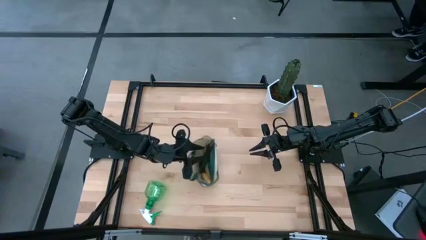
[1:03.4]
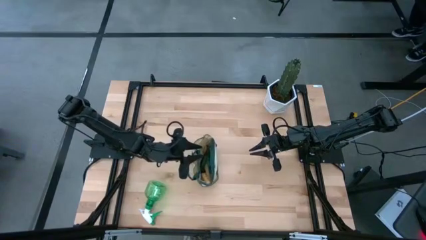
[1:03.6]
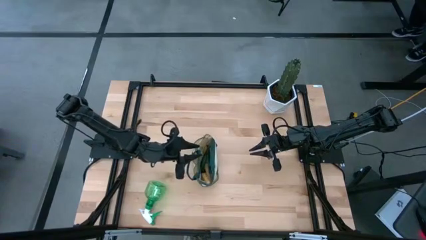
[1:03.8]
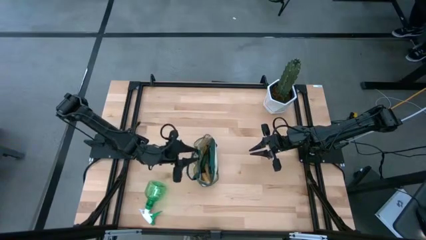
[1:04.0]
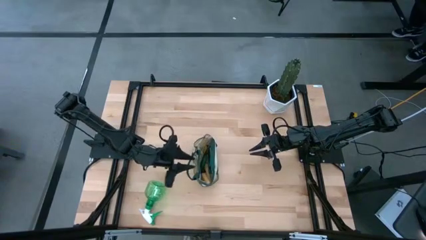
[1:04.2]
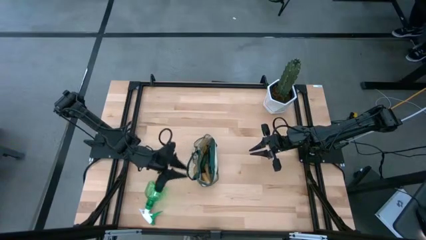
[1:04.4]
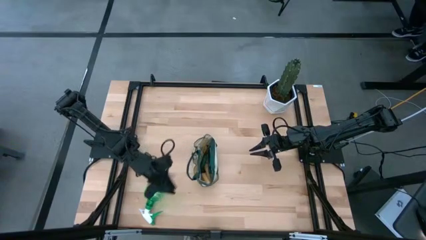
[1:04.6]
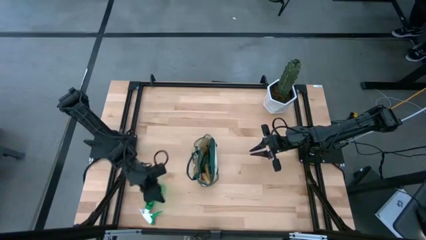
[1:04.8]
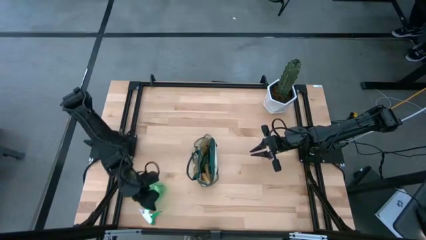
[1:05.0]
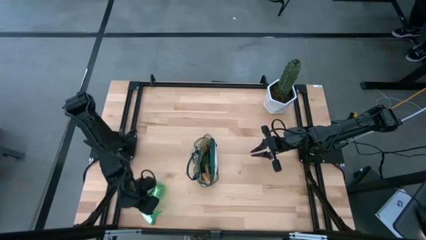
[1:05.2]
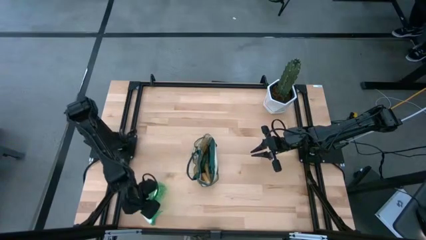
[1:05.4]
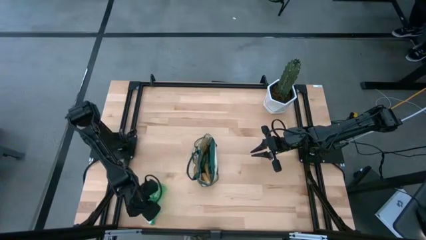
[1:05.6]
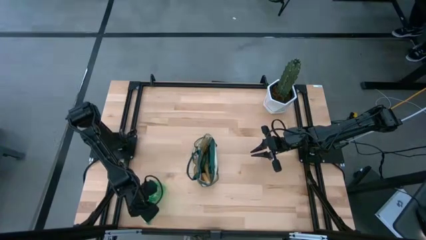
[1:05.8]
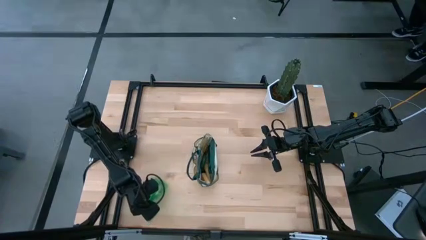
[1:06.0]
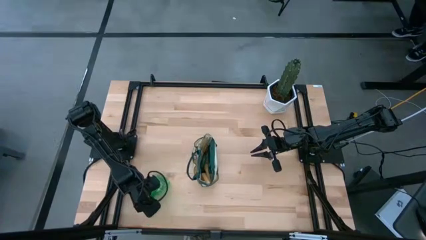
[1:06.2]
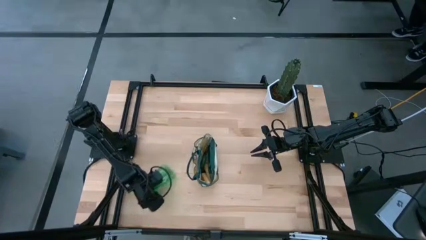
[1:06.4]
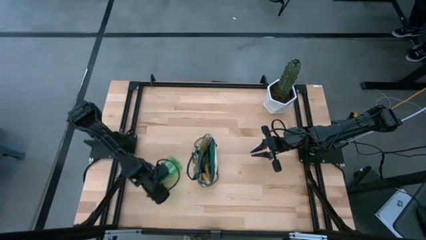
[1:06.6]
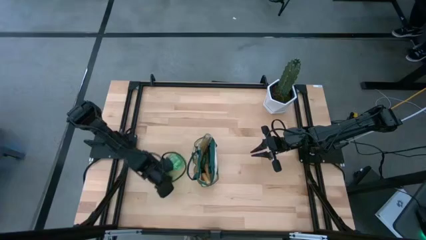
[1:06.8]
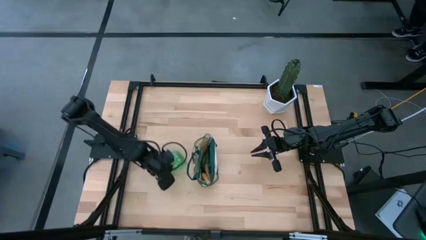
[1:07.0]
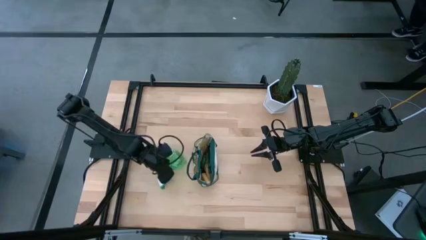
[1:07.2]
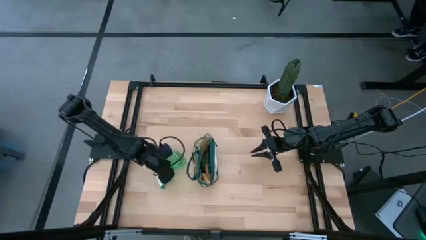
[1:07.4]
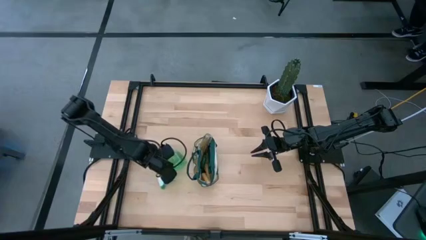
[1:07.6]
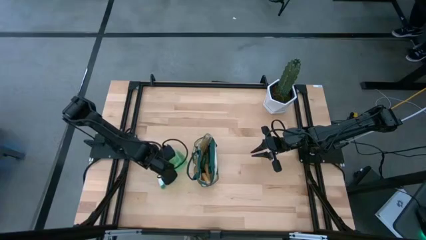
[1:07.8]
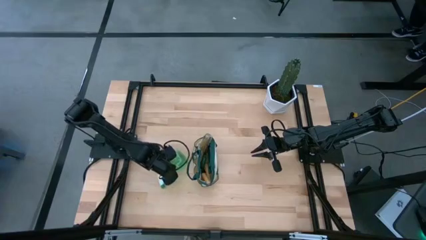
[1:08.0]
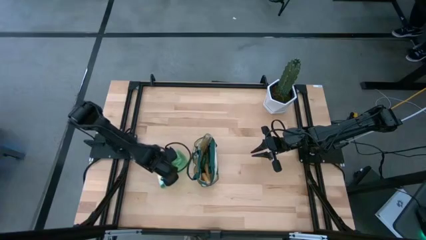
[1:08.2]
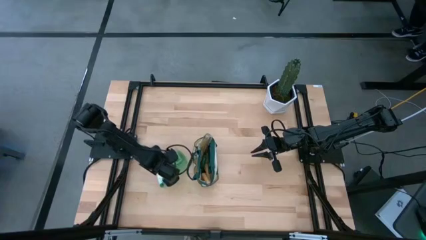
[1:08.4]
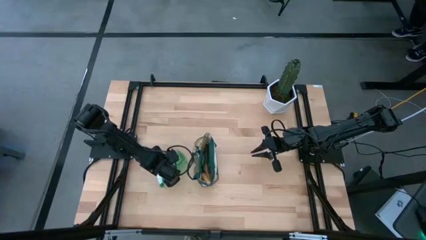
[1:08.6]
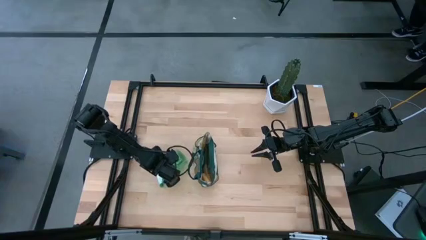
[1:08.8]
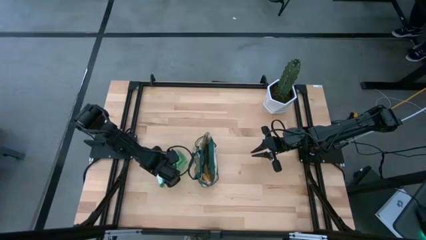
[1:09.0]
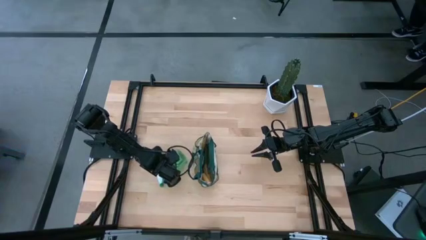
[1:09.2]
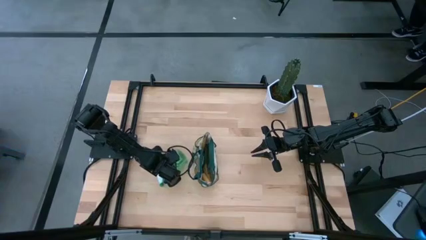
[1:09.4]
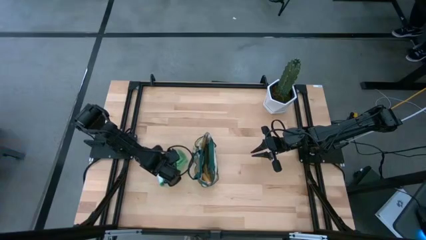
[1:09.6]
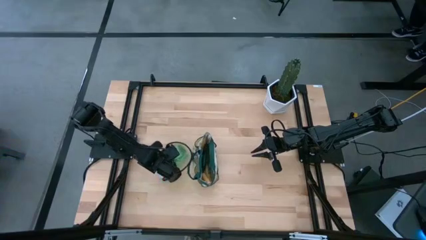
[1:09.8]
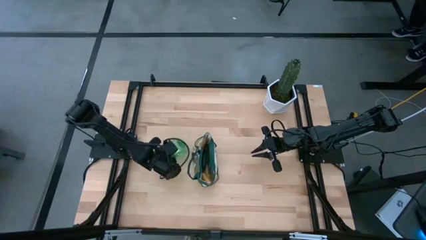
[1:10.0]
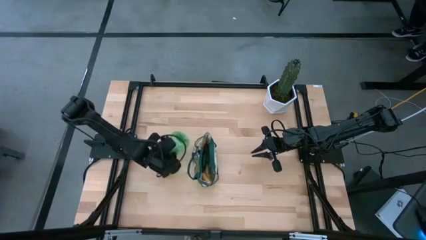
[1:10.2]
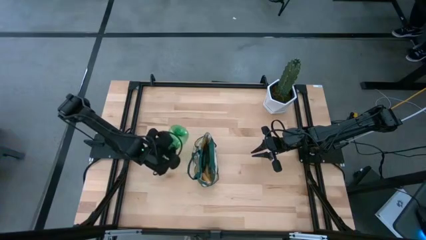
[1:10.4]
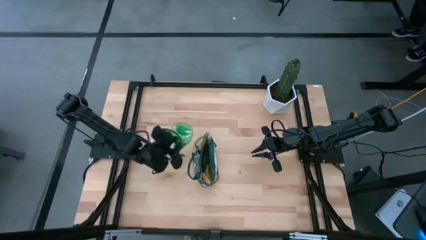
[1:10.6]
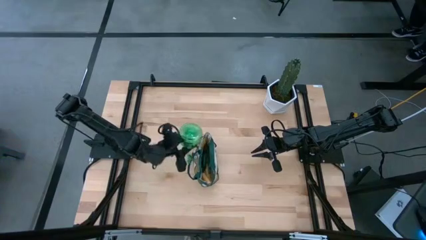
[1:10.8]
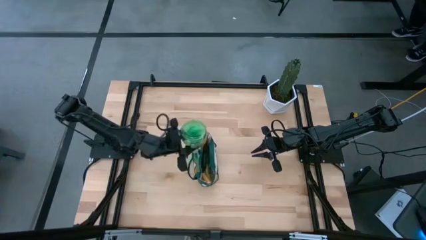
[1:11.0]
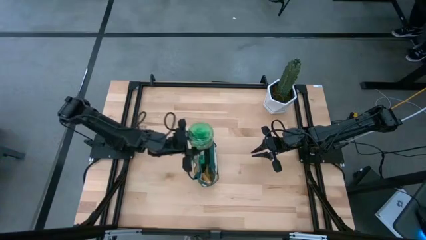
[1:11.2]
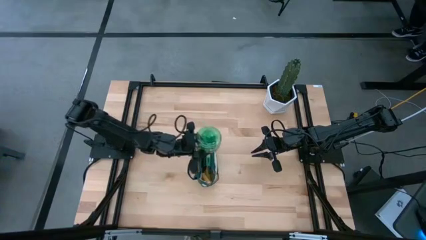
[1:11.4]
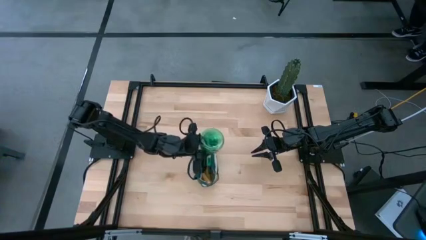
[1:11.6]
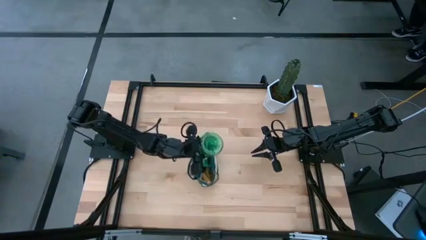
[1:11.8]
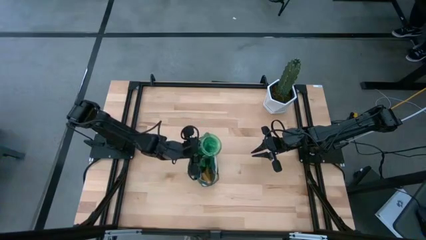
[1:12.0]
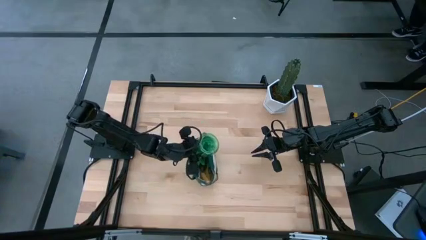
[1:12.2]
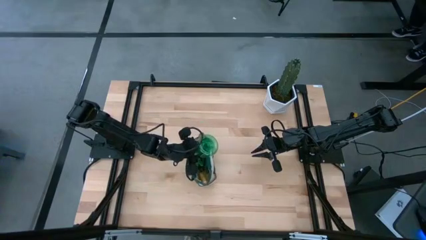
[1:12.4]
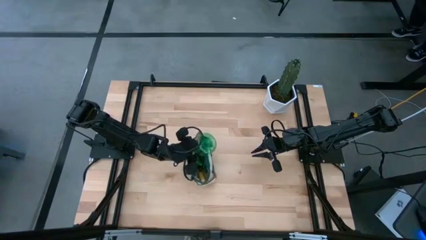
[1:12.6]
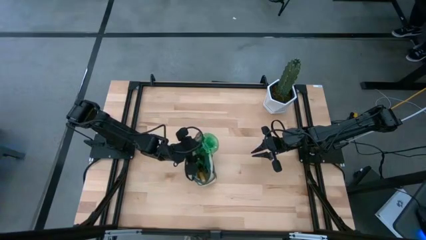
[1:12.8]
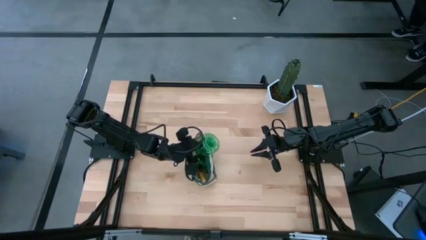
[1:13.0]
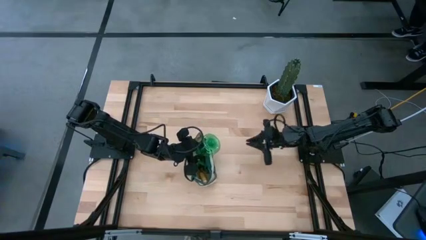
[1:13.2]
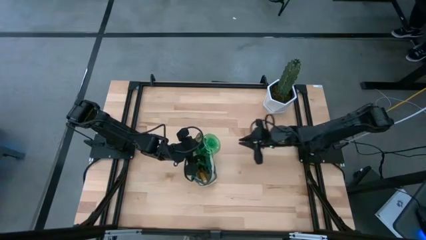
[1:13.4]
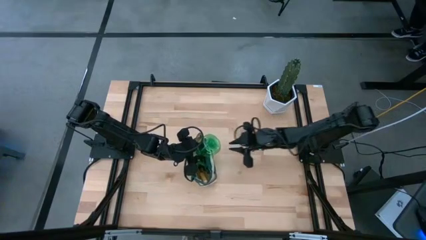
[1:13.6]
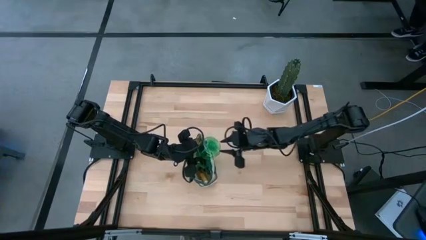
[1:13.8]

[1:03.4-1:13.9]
Task: Pick & Place Garden tools in Gardening bag
Put the green spray bottle into the gardening bag

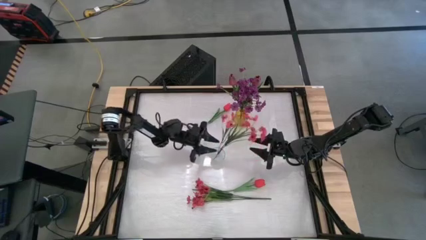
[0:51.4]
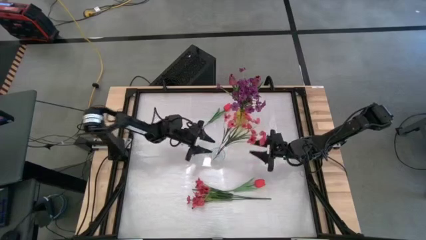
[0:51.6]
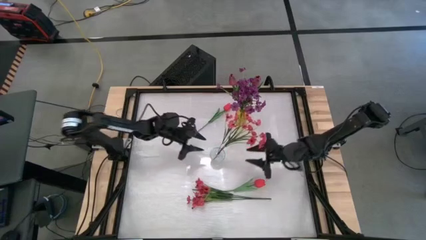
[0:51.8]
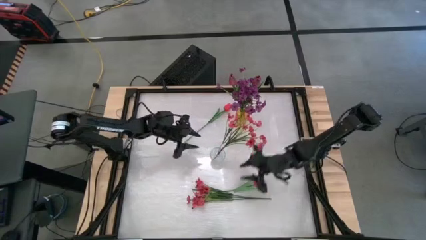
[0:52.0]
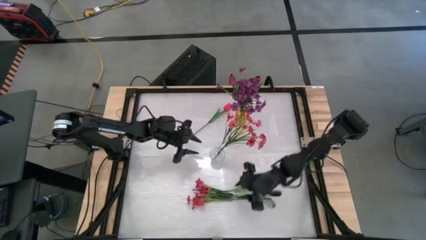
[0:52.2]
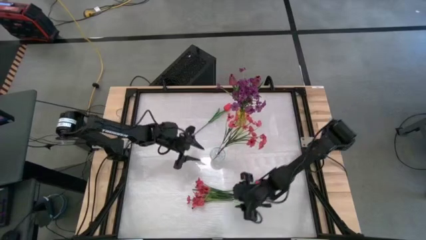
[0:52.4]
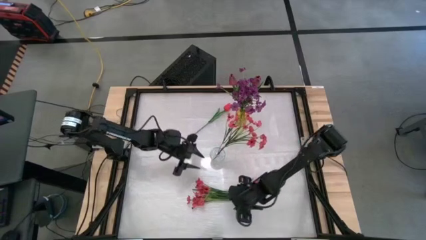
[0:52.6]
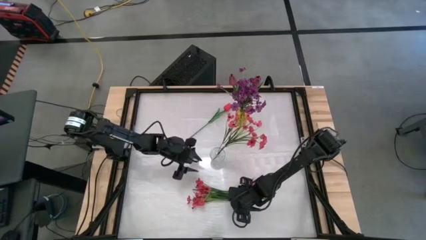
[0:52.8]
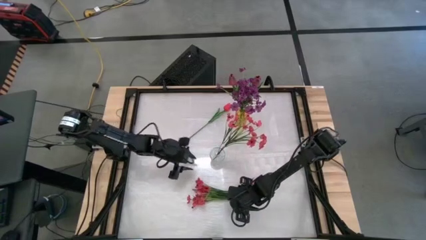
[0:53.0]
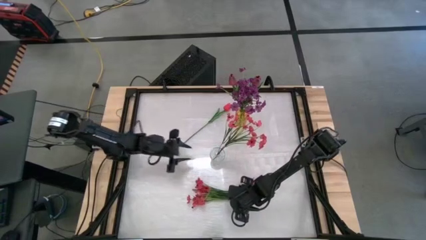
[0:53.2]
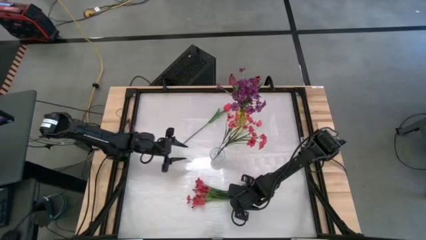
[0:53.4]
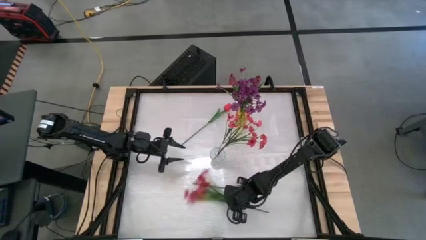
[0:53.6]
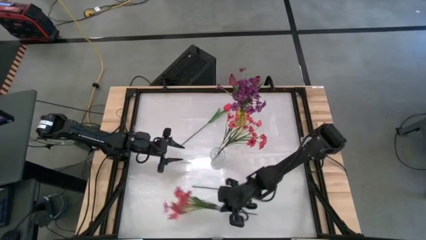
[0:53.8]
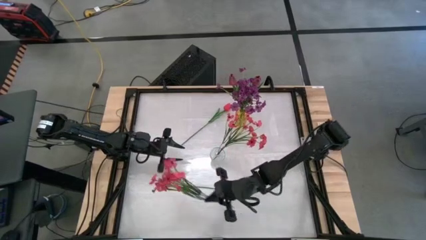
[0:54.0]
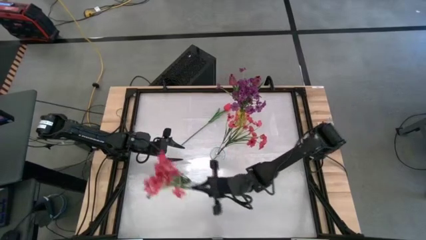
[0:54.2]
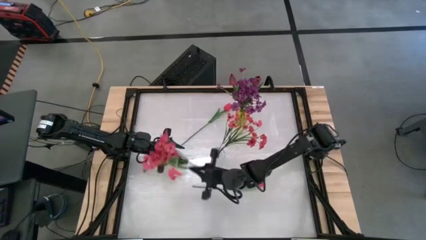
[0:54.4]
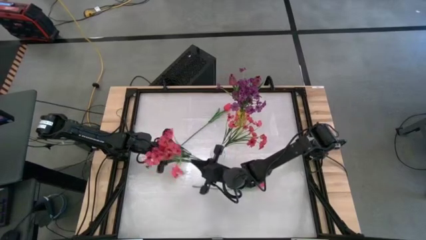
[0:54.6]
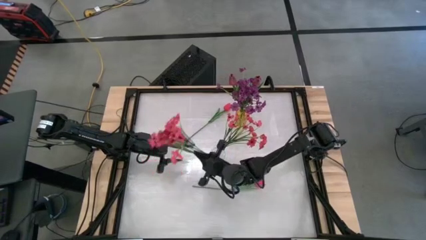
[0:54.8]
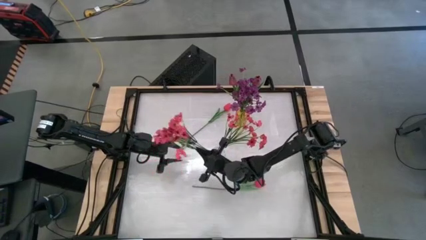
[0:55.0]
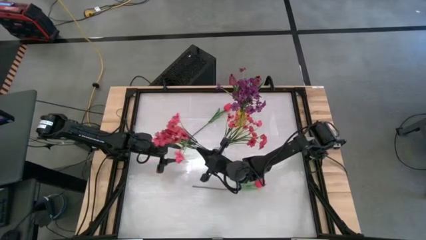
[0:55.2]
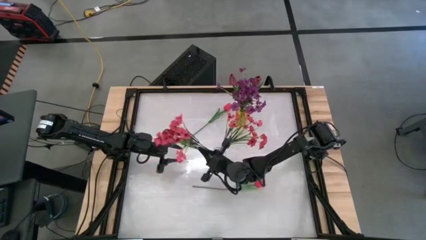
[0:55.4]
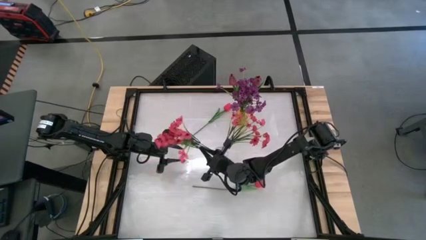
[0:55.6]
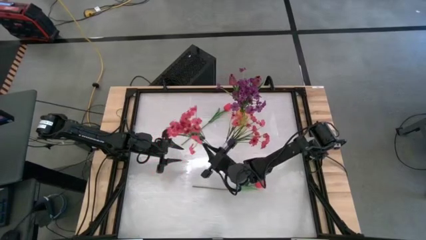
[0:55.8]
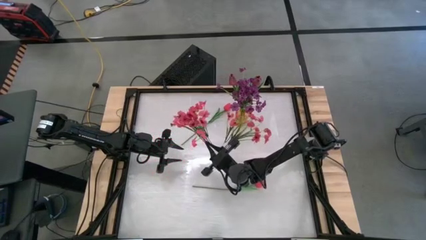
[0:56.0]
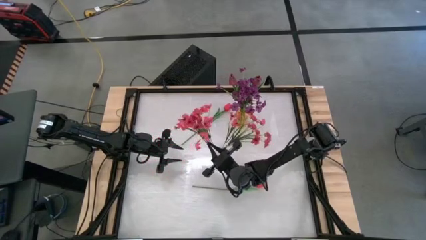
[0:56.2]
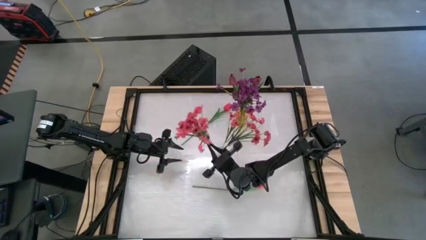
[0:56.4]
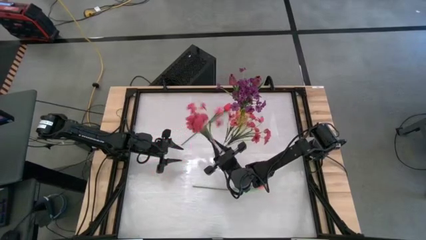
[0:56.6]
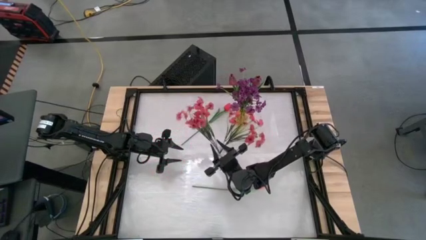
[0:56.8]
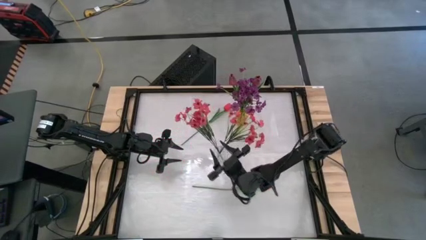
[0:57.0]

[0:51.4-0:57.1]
Task: Sort flowers into vase by color
Put the pink flower into the transparent vase
